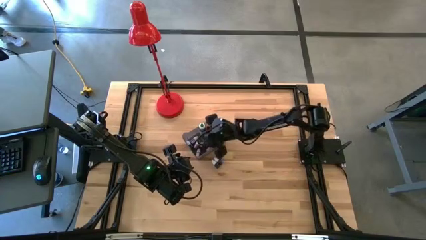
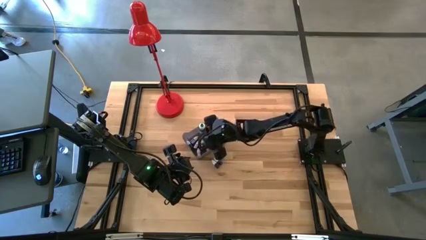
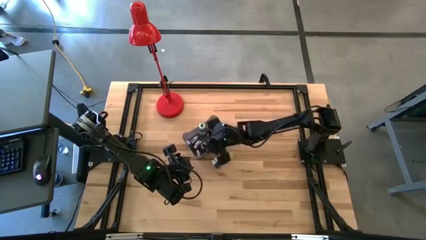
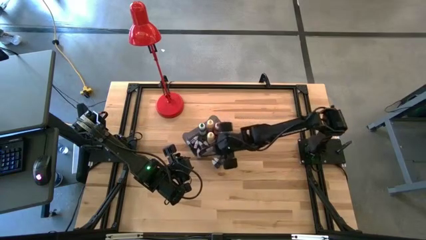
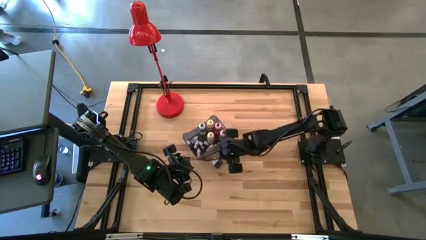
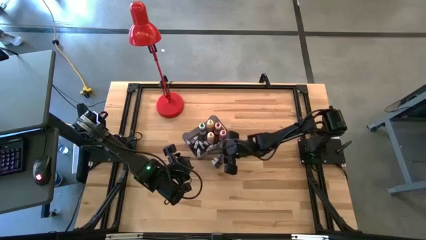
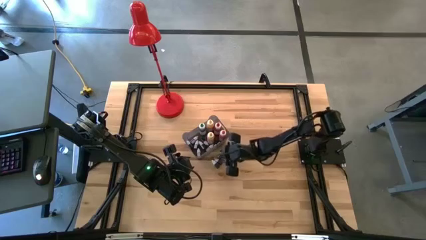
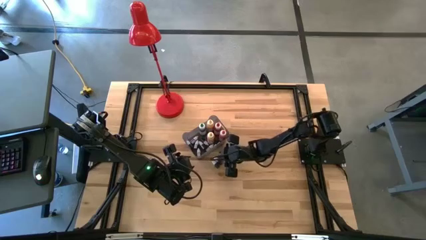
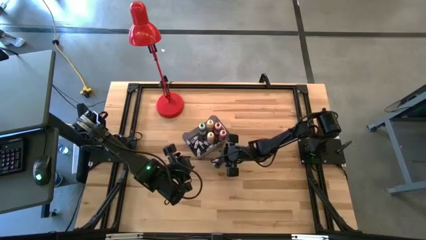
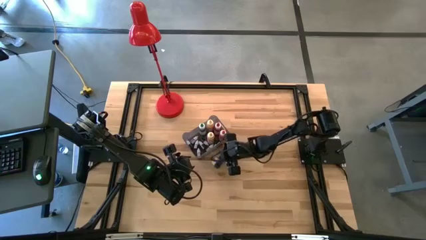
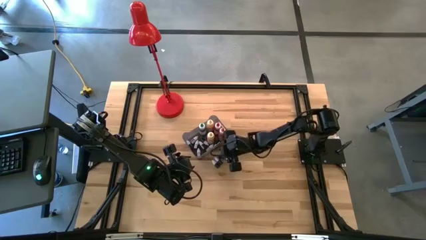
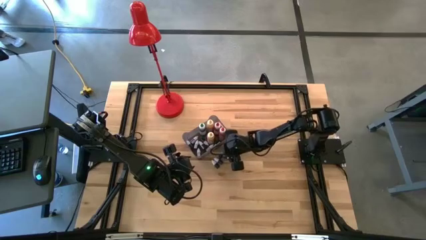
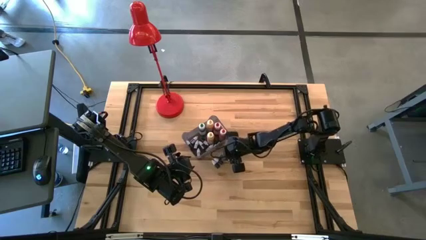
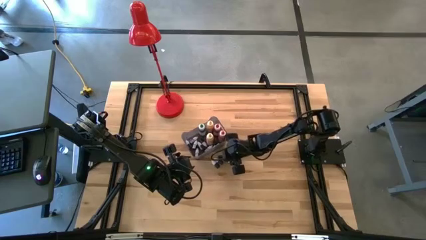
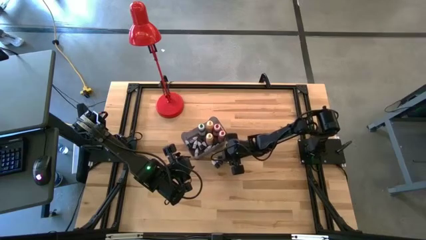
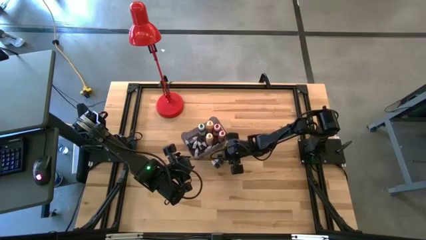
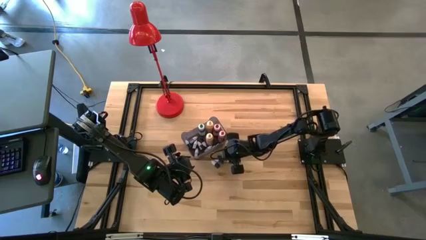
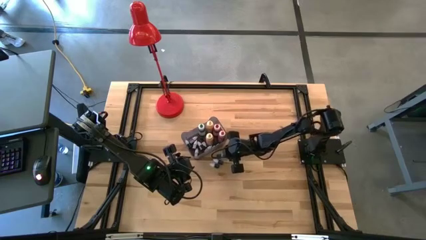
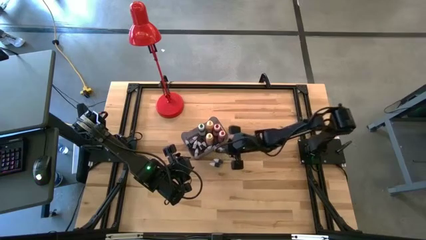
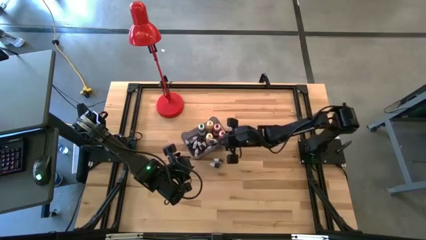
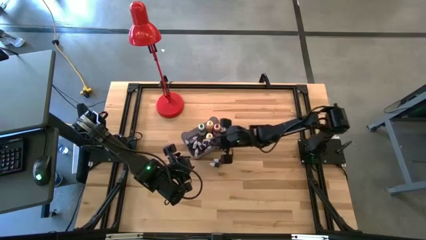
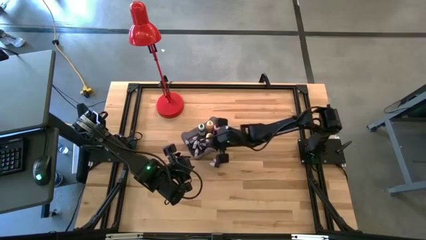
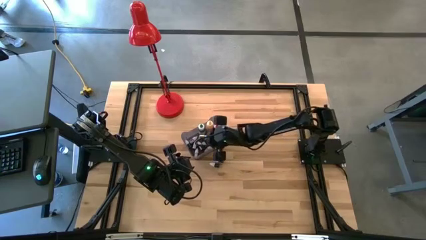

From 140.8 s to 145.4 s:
Task: Pick & Place food coloring
Put the small green food coloring bottle into the bin

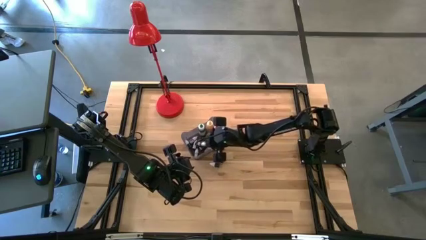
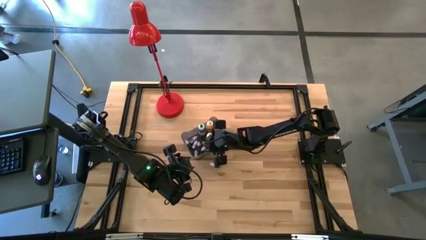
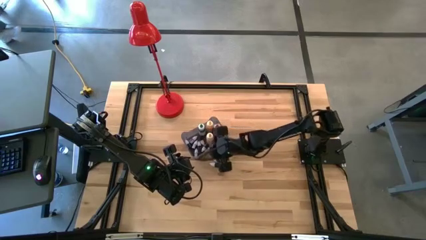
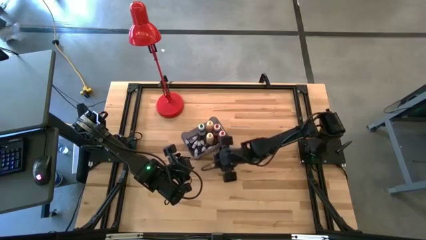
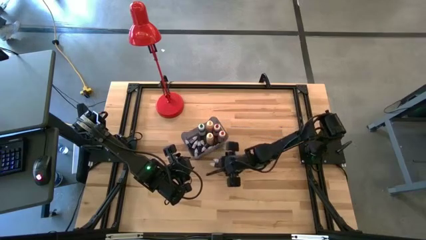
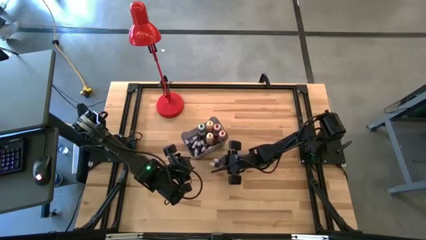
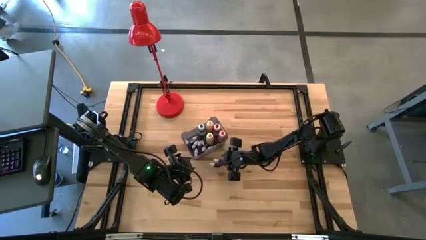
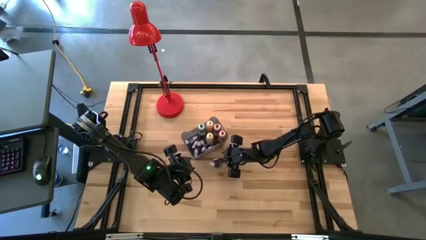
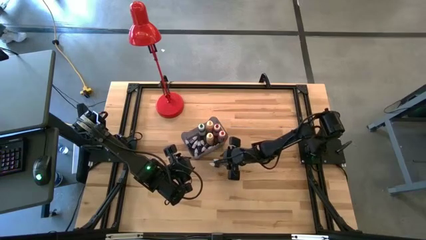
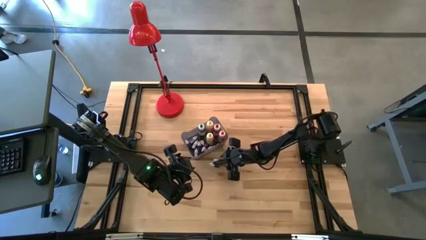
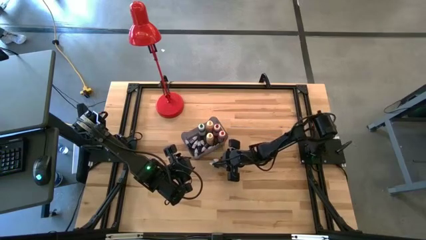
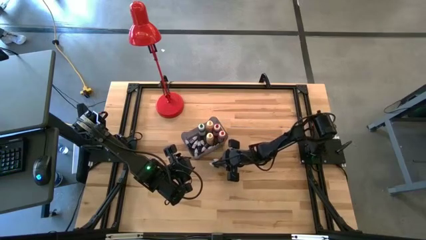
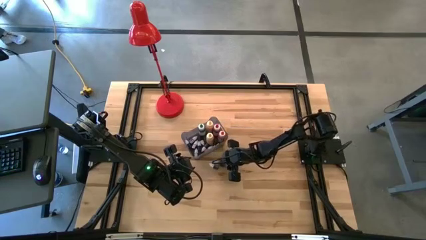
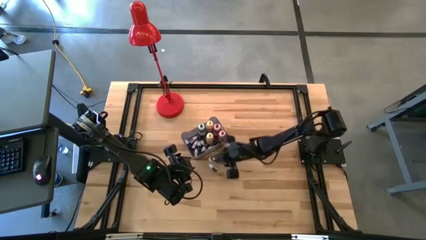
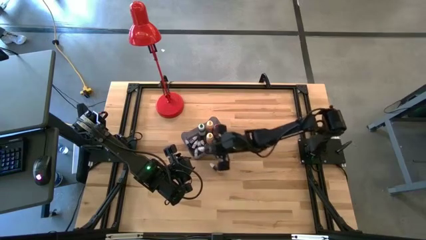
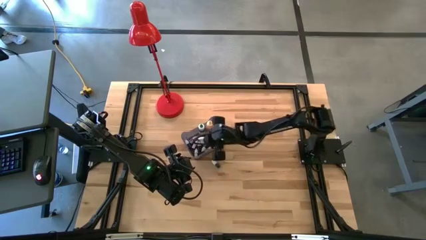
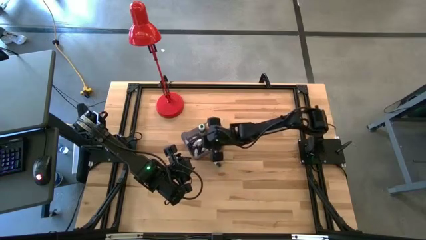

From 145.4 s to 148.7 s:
Put the top small black food coloring bottle into the bin

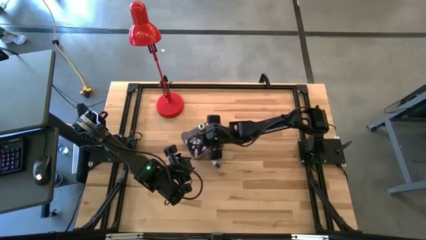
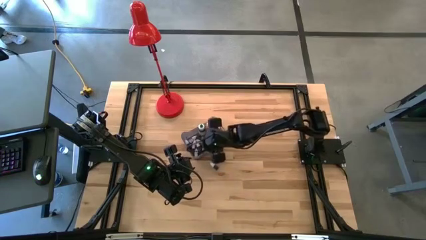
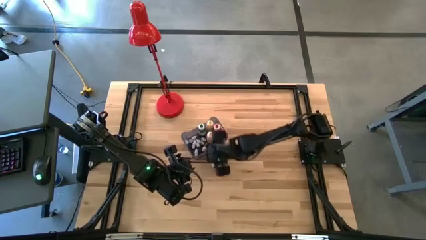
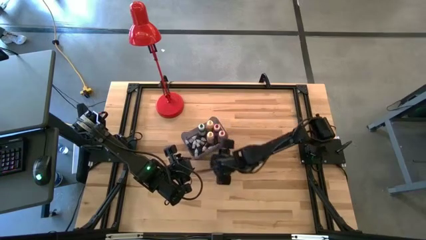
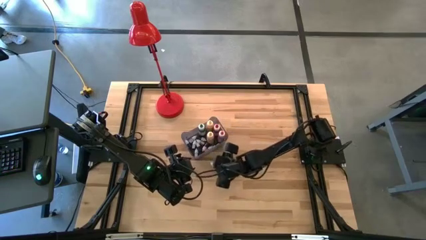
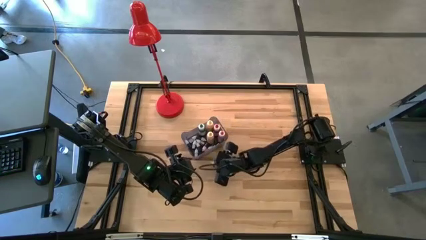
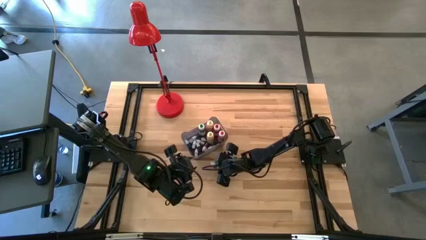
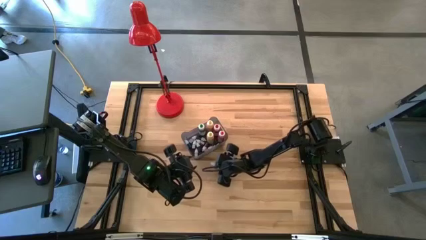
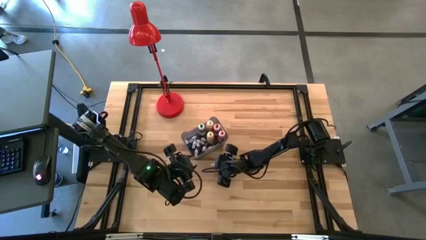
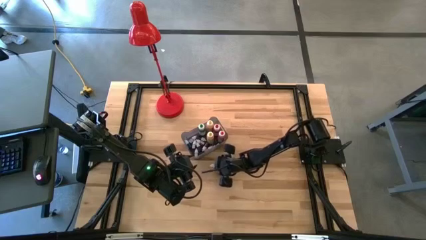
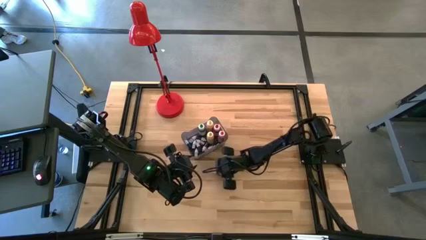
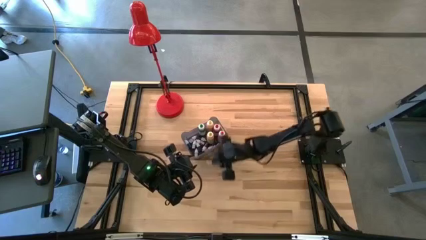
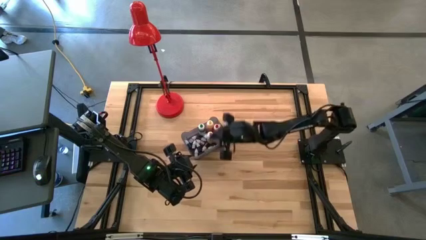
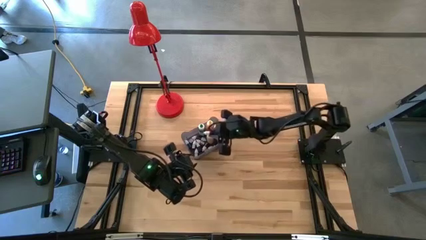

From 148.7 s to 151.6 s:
Put the small black food coloring bottle into the bin

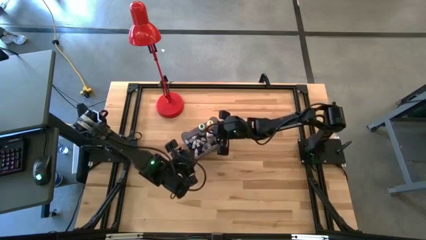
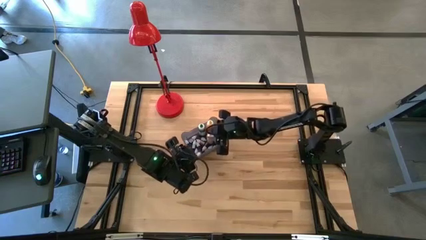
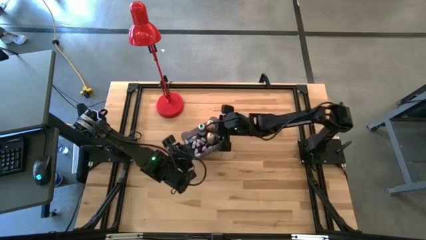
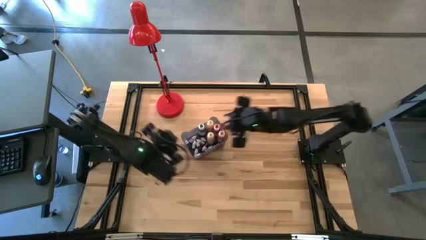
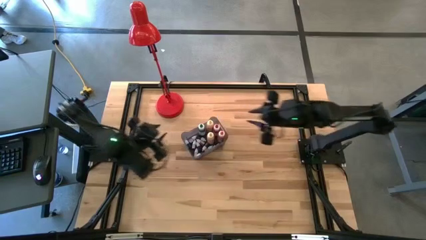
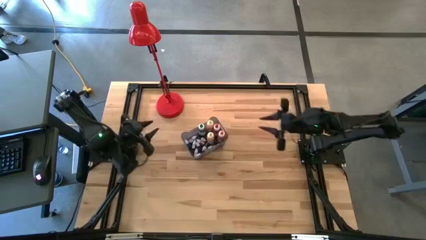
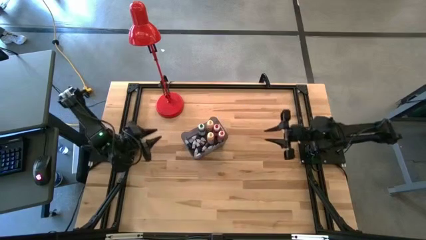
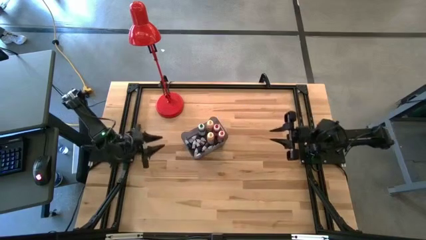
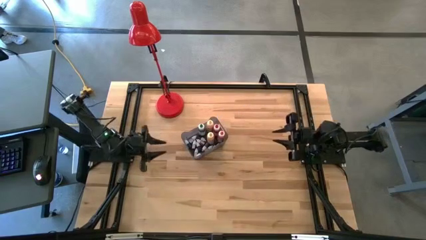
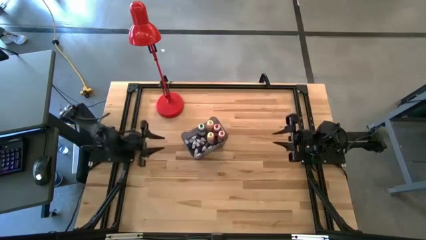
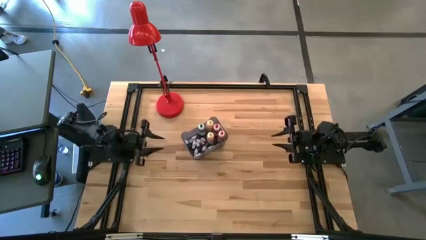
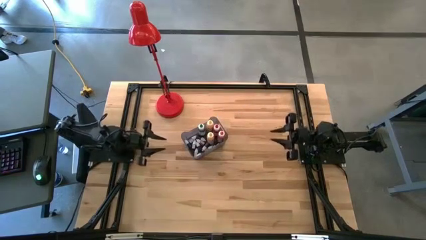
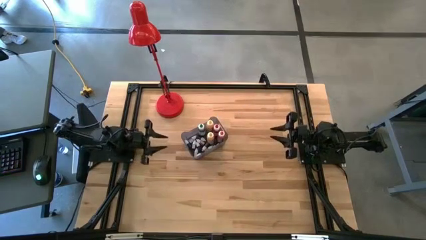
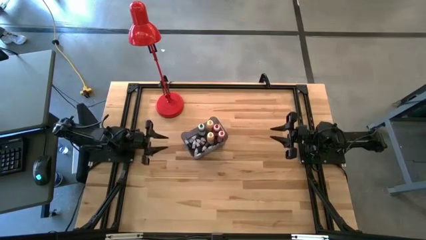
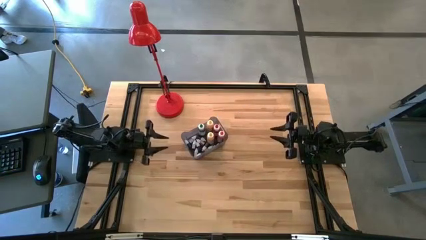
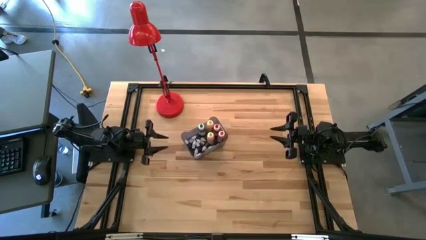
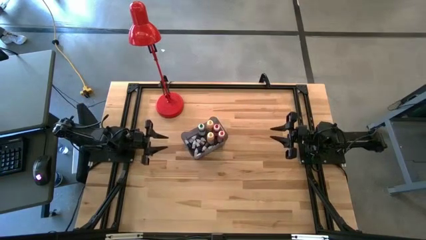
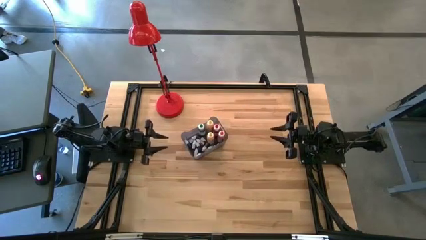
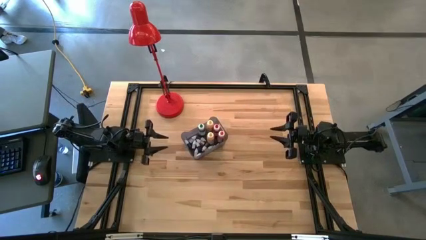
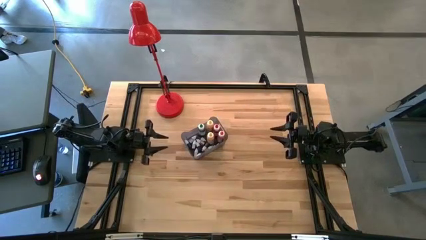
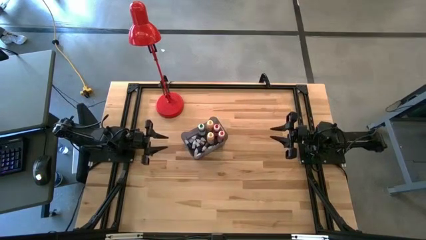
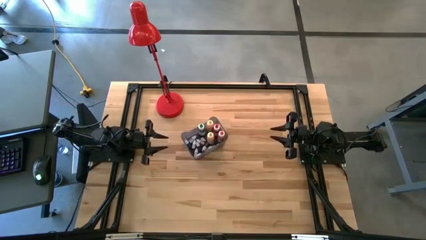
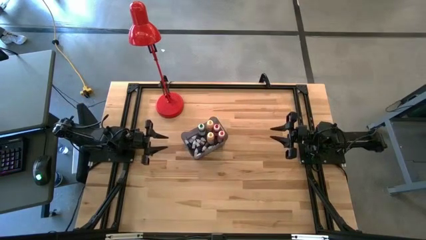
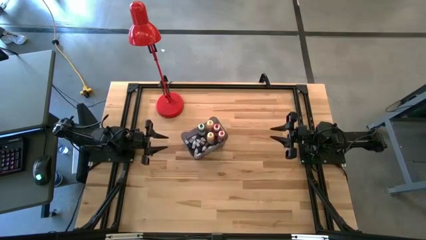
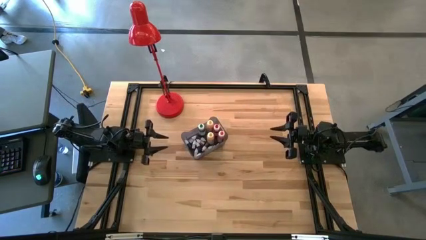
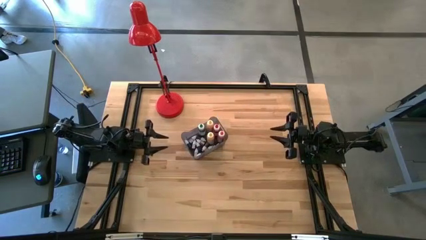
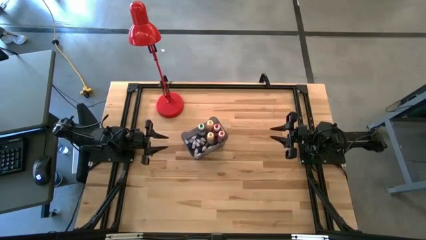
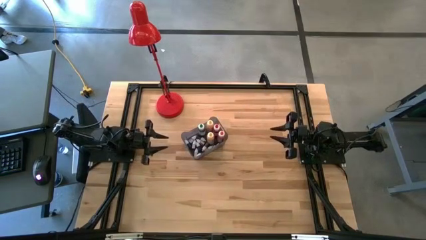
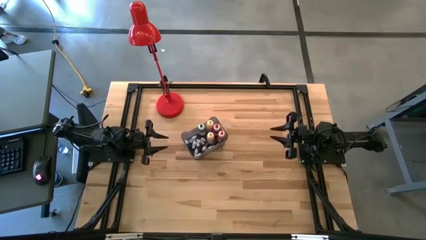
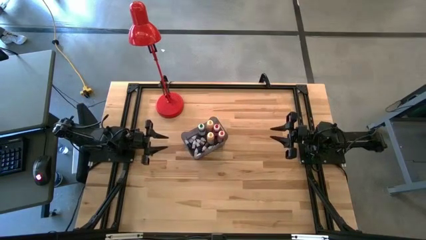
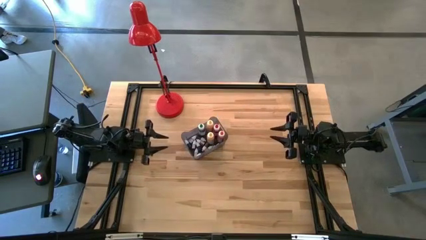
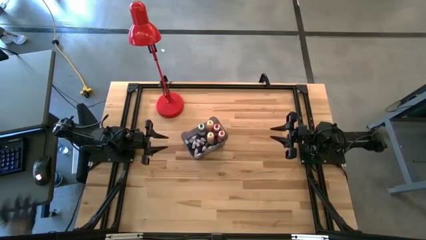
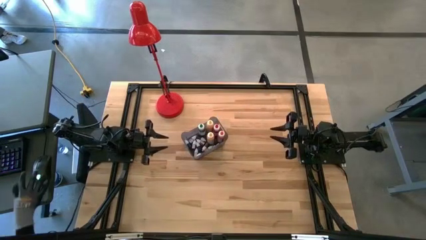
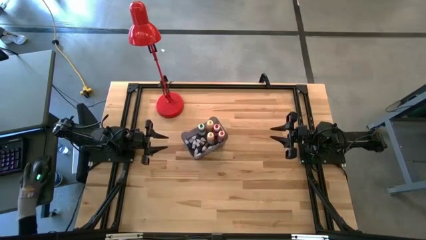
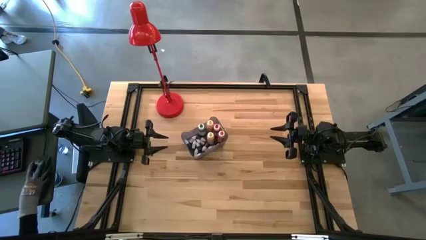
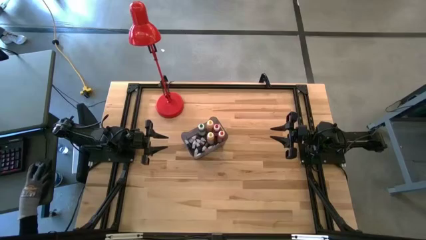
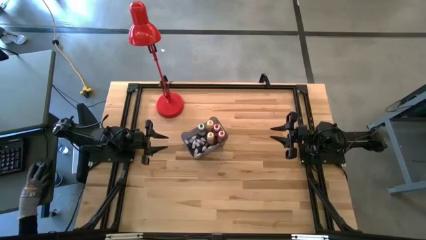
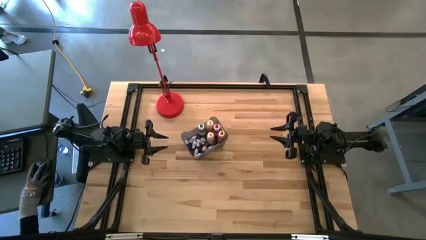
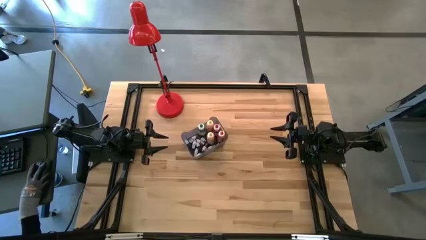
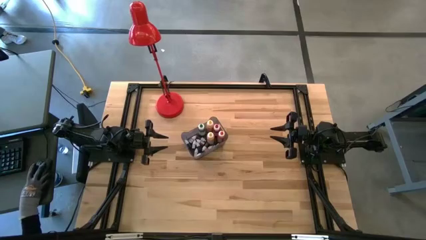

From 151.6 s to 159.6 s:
Return to Home Position
